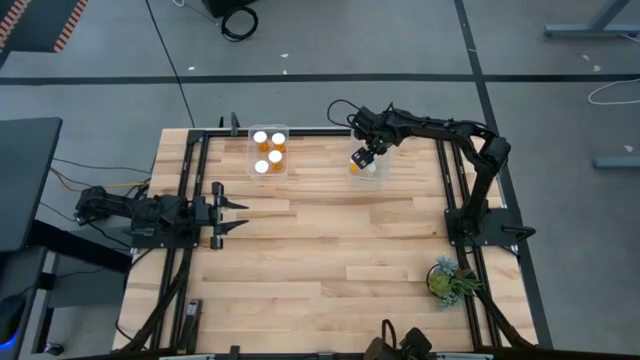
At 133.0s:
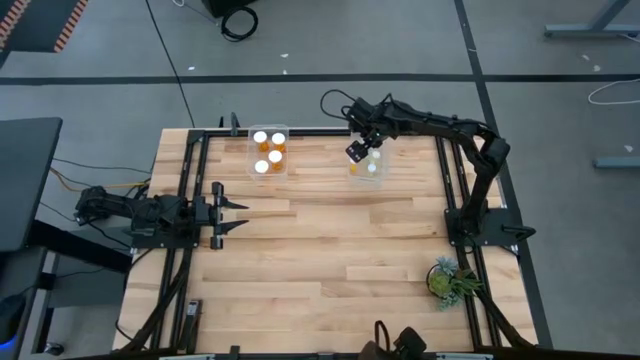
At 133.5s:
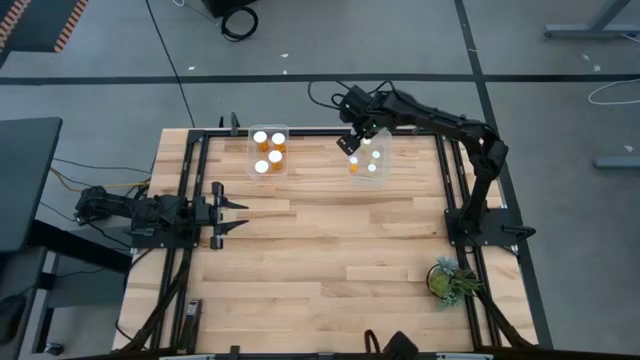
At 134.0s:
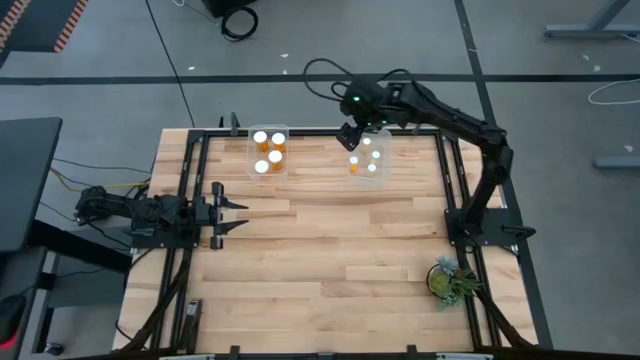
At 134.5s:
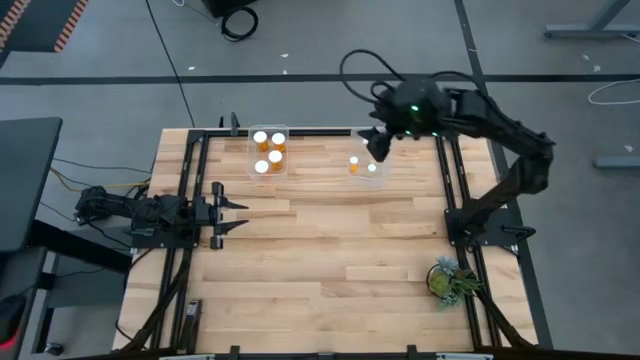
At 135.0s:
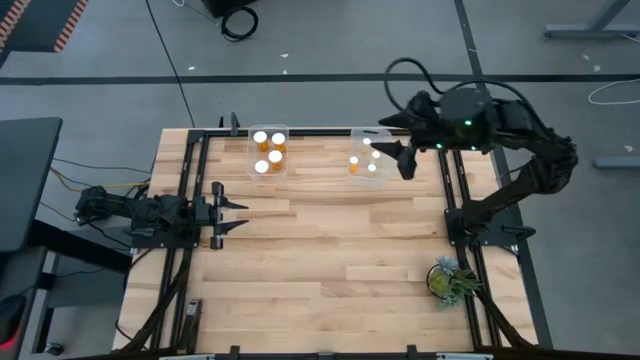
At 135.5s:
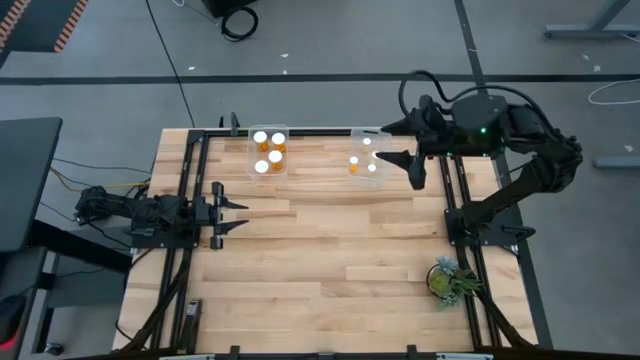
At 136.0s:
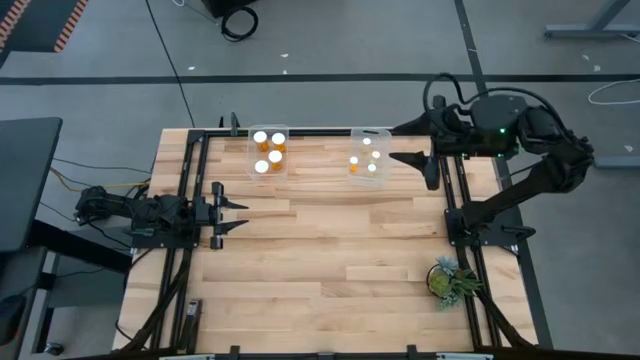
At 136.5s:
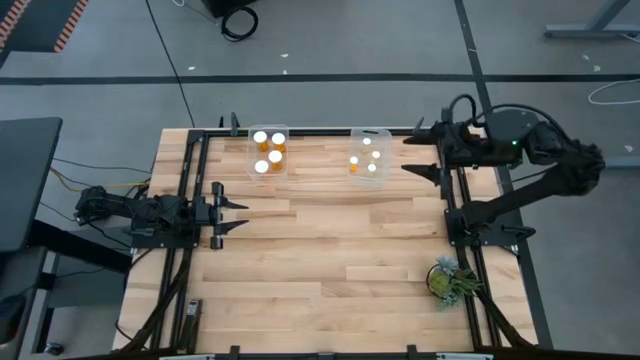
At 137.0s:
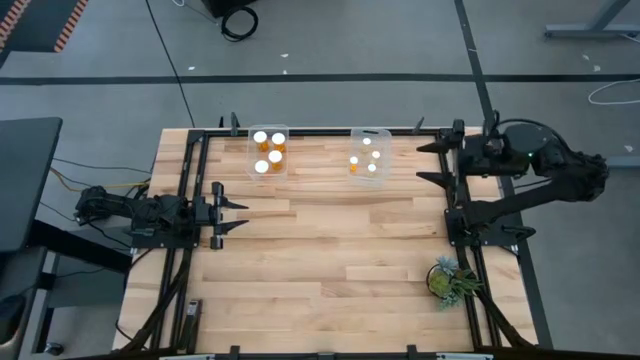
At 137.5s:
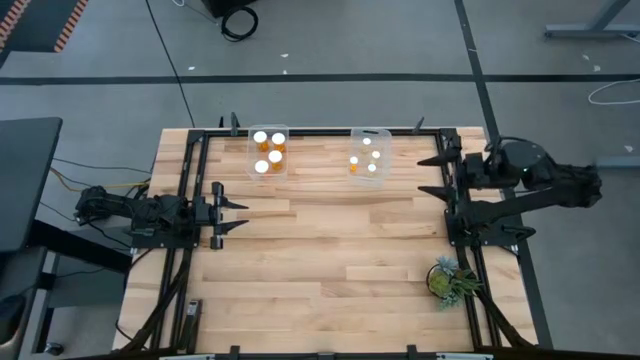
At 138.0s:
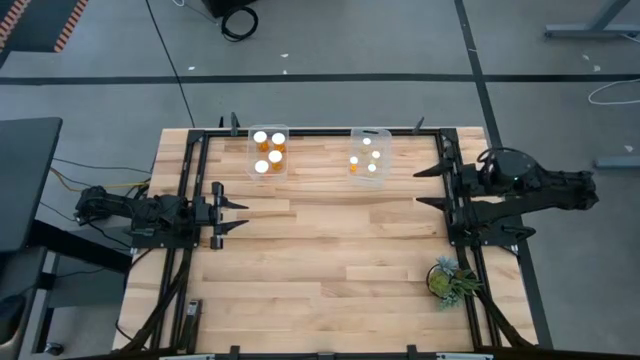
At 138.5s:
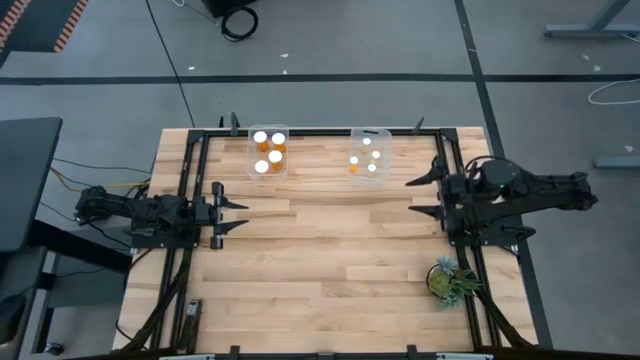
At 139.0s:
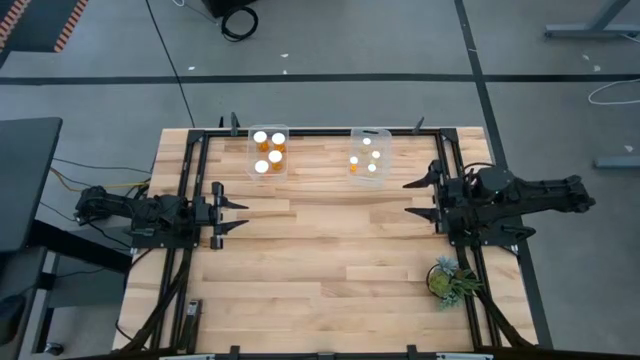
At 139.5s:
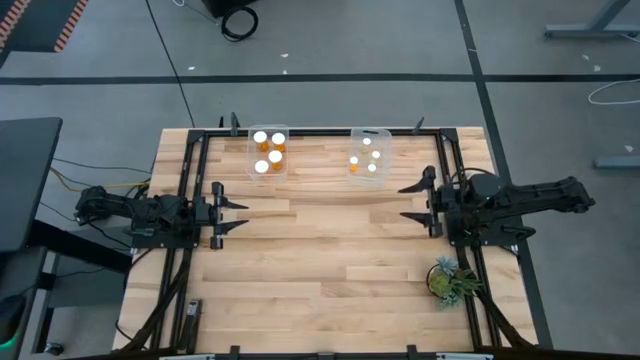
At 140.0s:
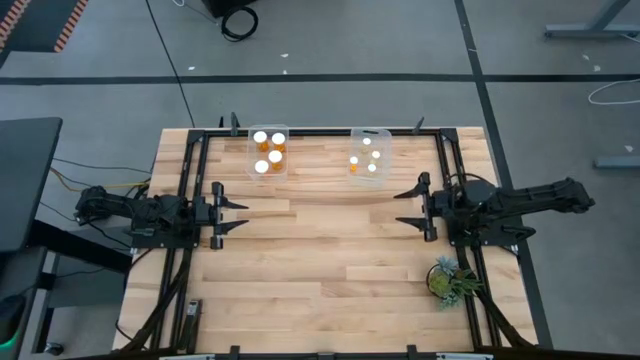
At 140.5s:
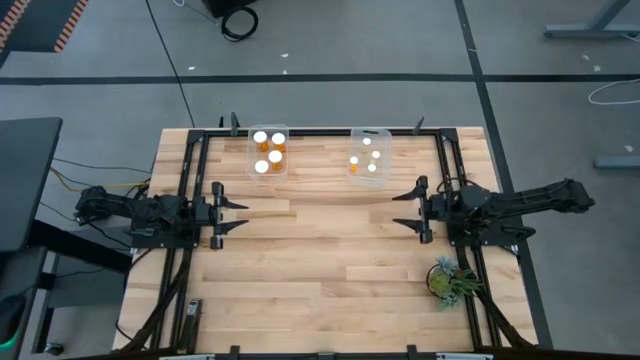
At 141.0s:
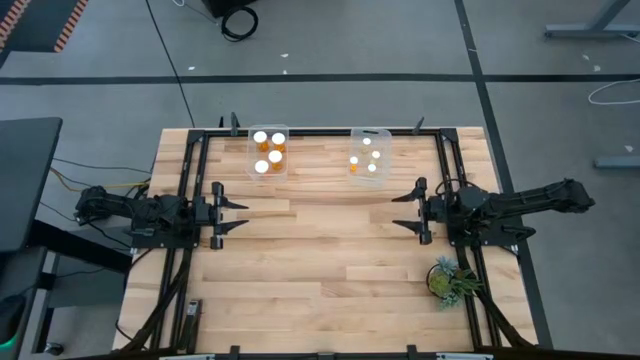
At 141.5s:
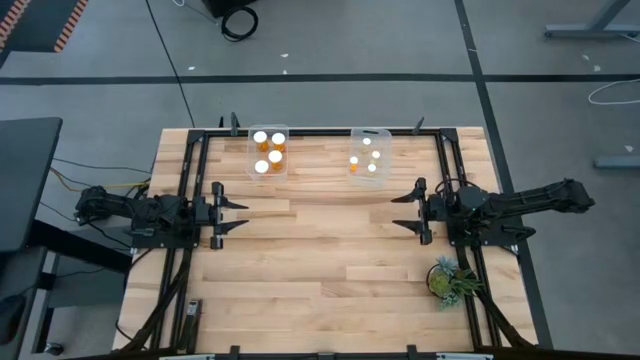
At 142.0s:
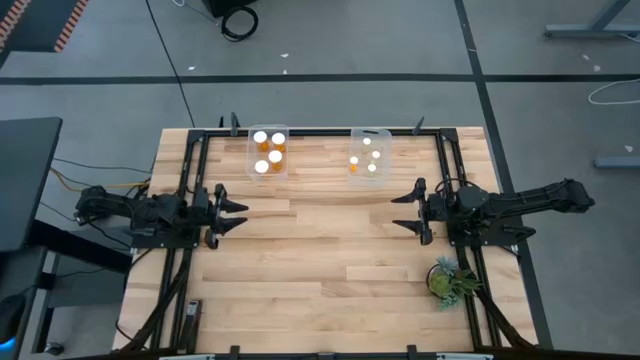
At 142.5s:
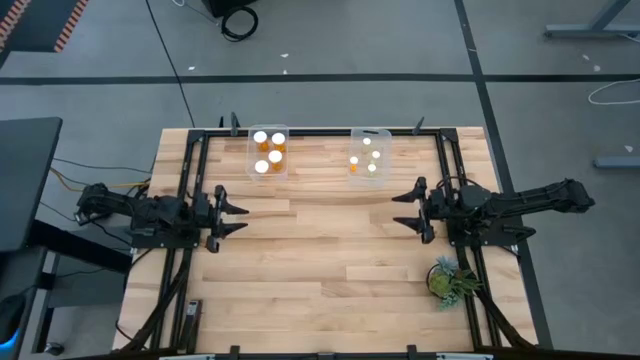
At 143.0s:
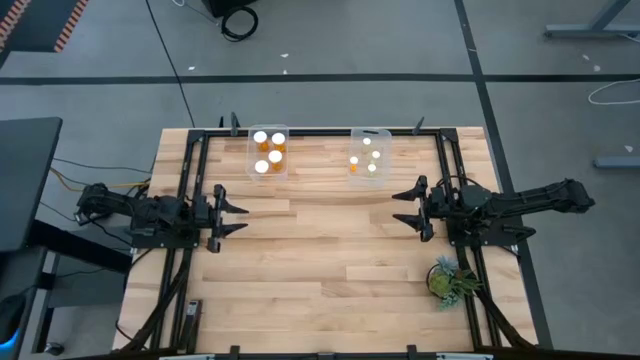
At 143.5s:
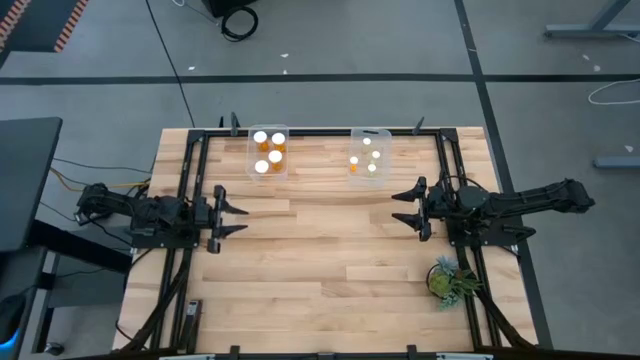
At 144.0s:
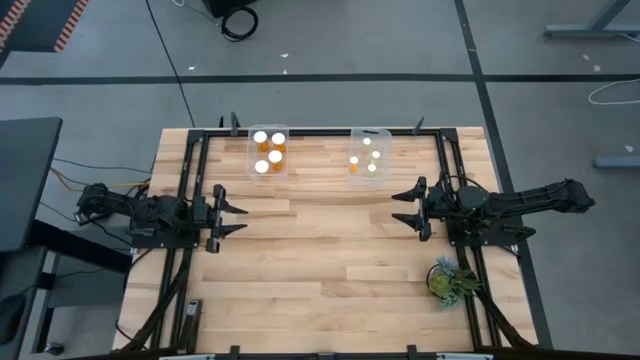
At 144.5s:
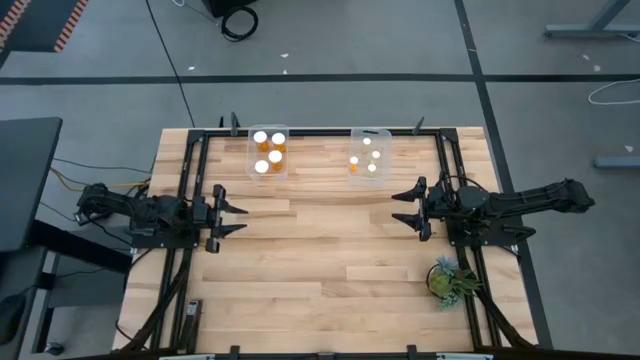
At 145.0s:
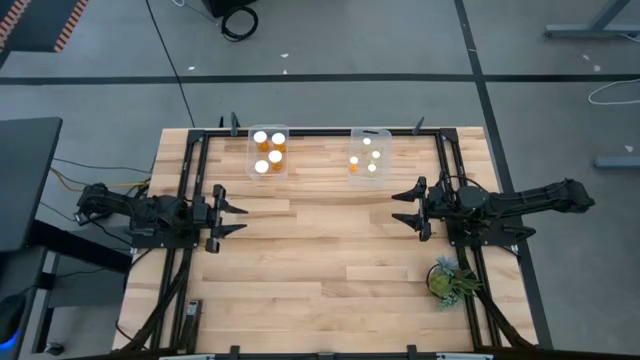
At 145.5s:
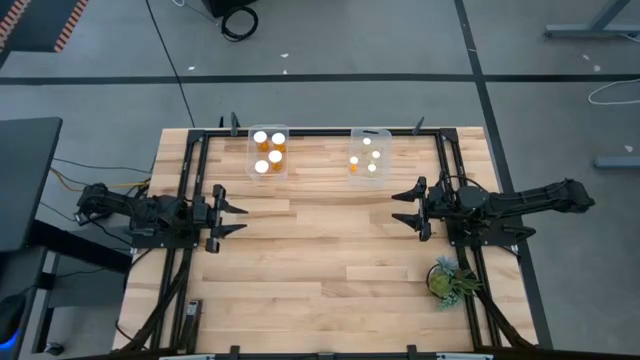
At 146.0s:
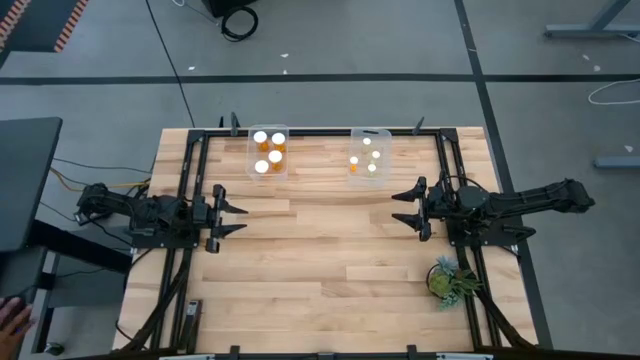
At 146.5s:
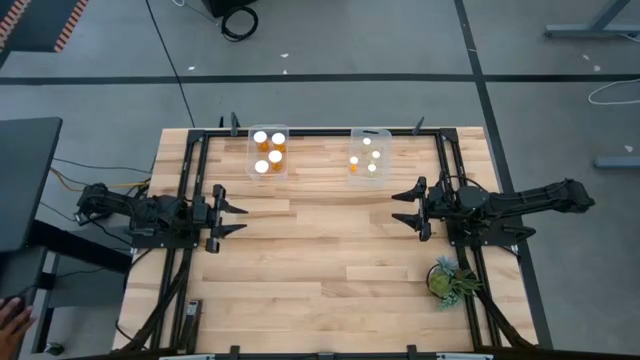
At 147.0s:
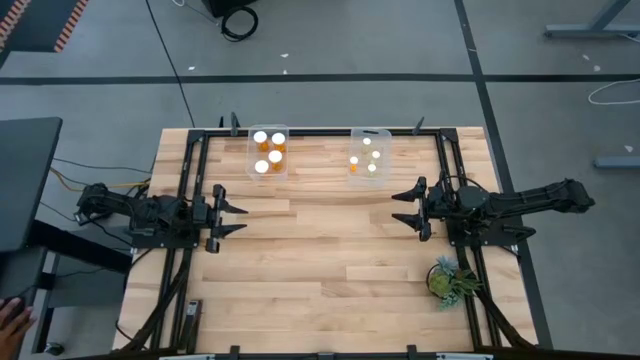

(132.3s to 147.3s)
Task: Pick and place medicine bottles into bin by pill shape (circle, oval)
Return to Home Position

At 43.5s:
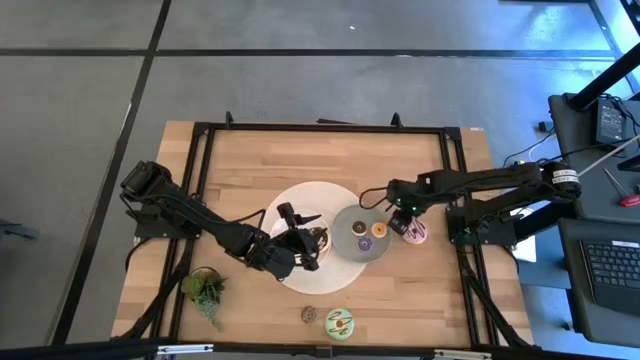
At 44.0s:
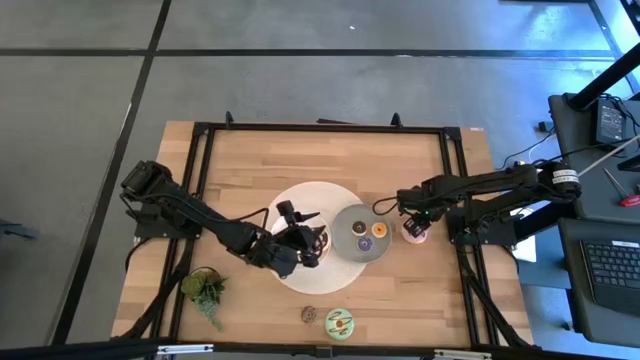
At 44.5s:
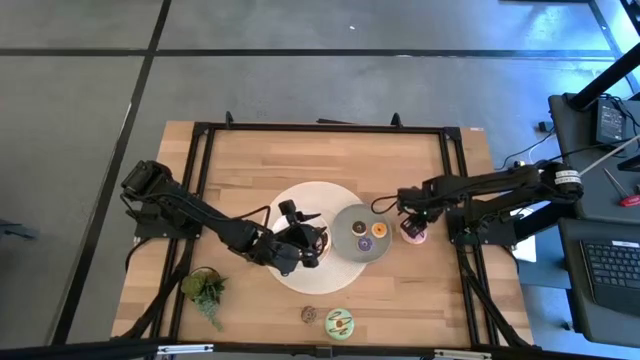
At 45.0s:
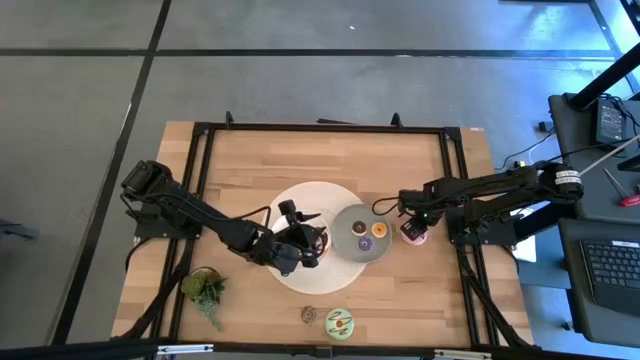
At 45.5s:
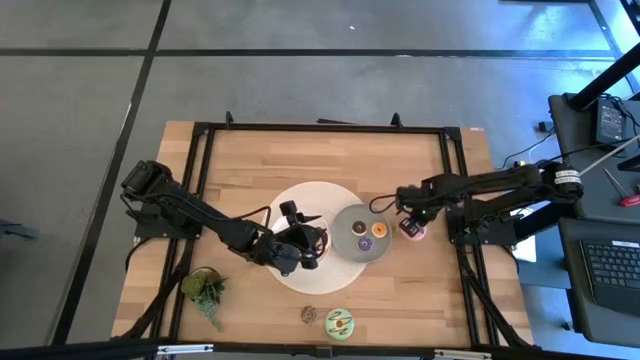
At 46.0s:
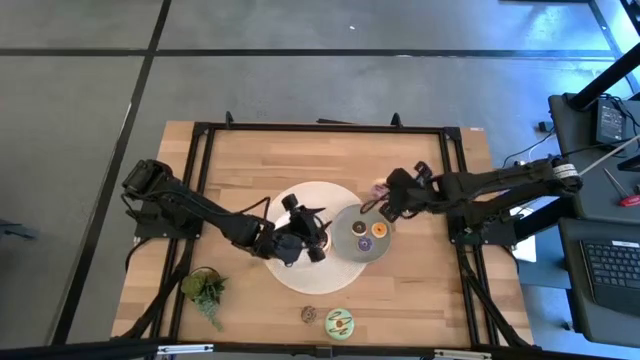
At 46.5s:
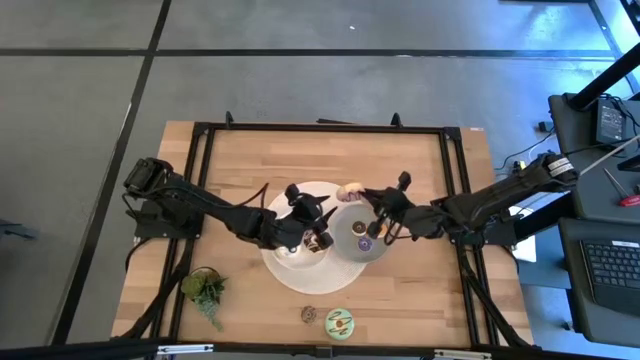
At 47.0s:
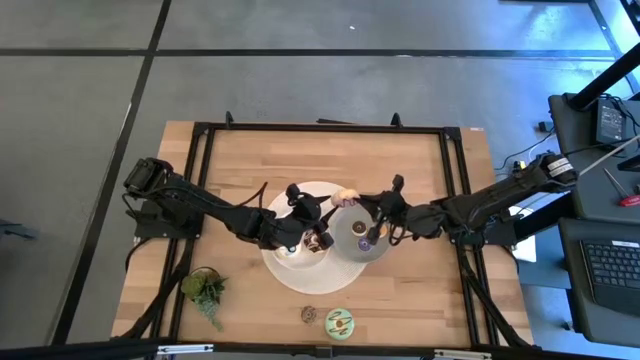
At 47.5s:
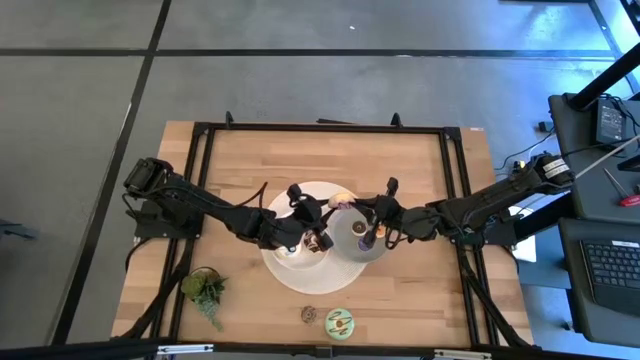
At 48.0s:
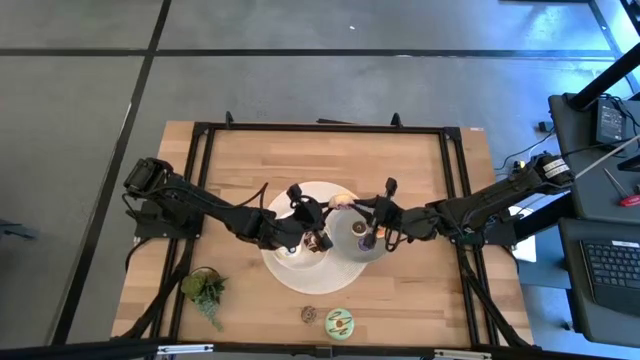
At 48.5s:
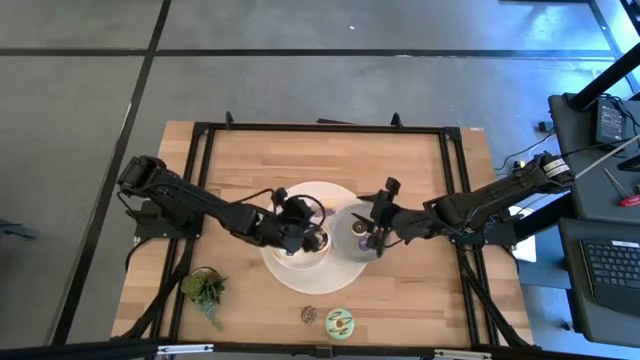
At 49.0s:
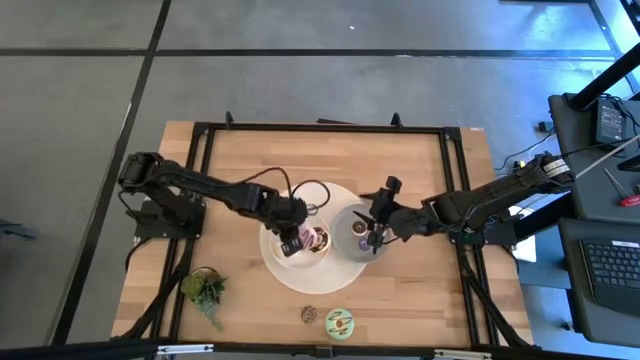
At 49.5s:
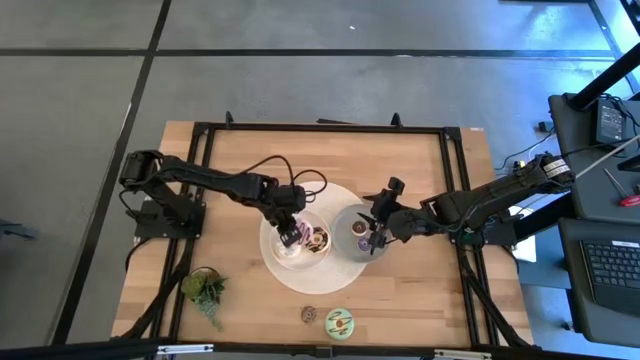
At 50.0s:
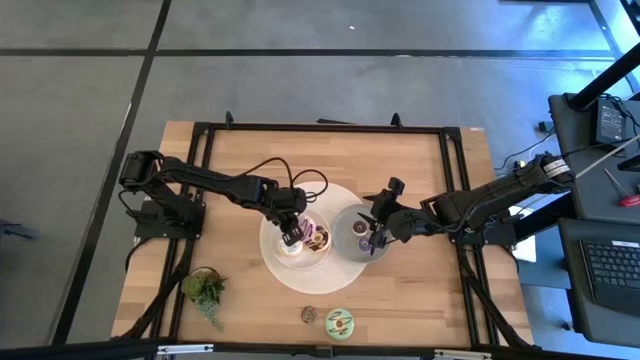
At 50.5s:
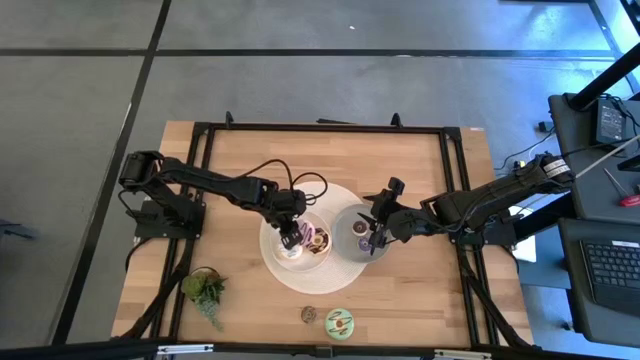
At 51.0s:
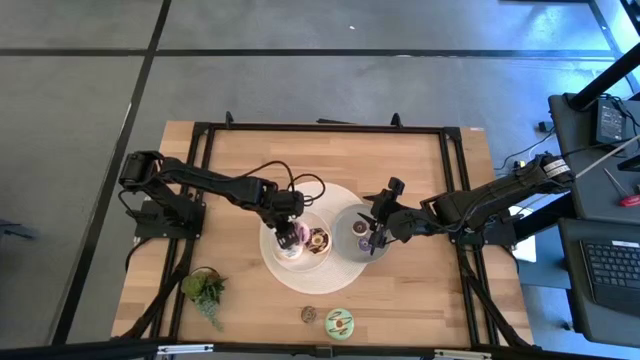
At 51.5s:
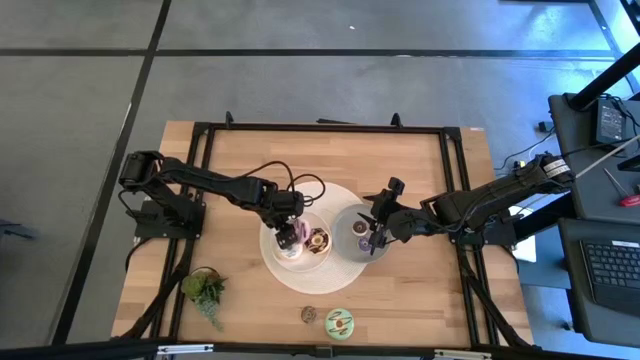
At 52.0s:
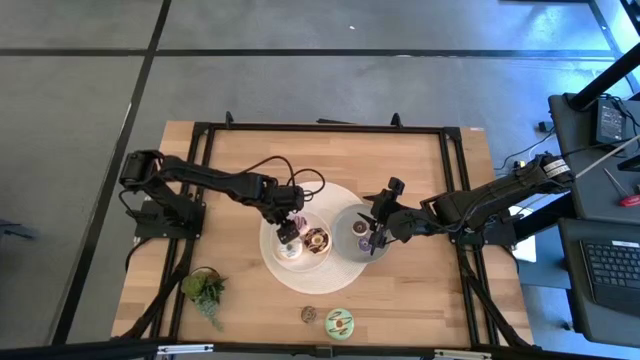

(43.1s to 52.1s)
Task: Pick & Place donuts
Put the big purple donut on the white plate
